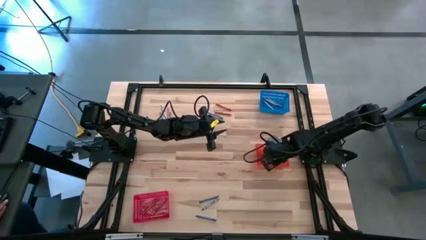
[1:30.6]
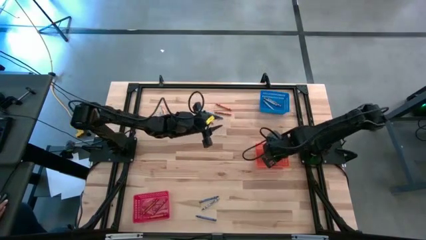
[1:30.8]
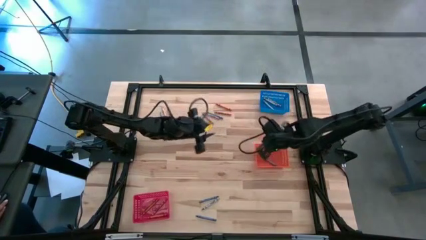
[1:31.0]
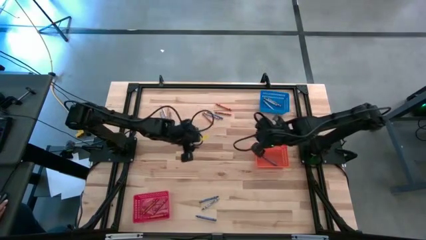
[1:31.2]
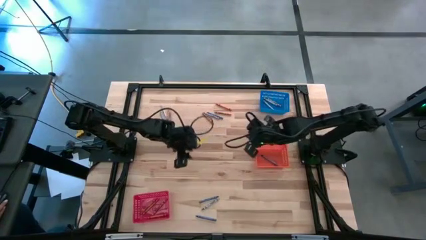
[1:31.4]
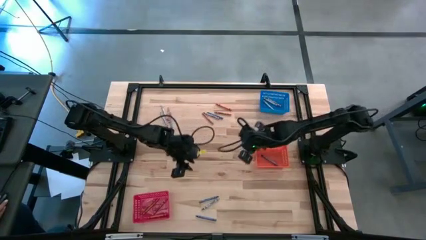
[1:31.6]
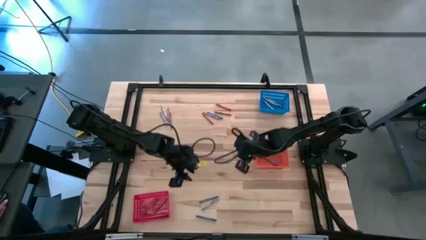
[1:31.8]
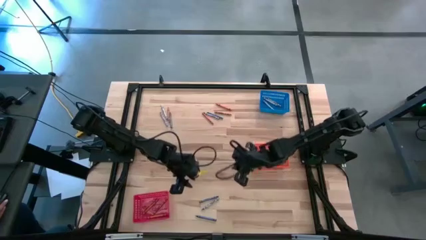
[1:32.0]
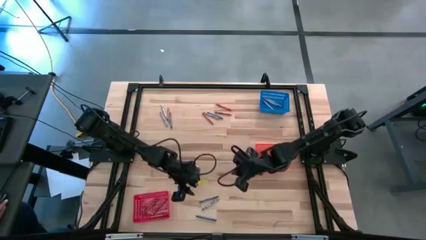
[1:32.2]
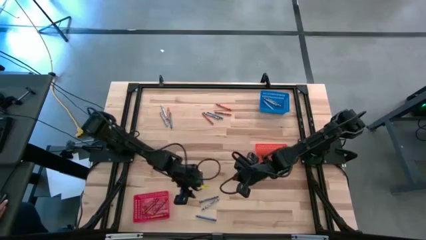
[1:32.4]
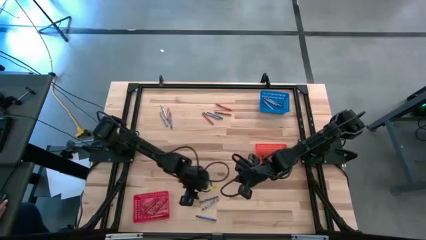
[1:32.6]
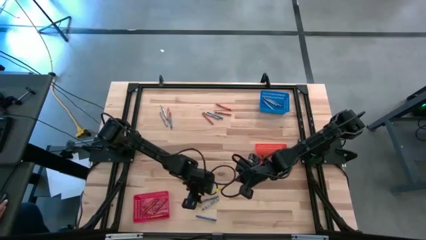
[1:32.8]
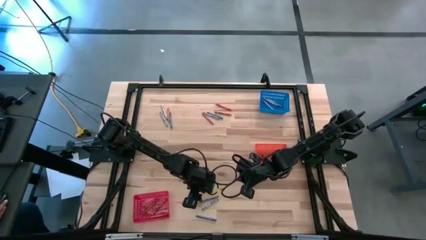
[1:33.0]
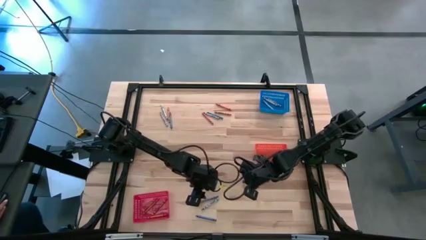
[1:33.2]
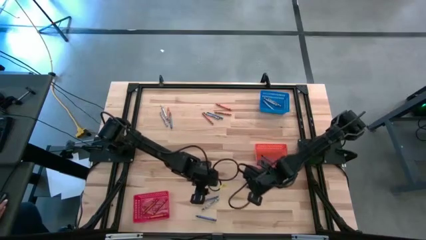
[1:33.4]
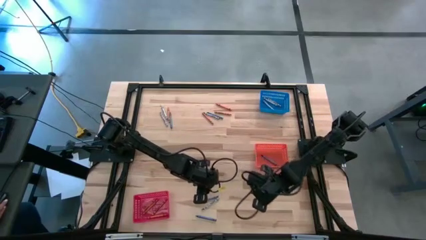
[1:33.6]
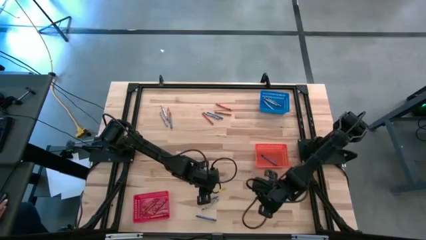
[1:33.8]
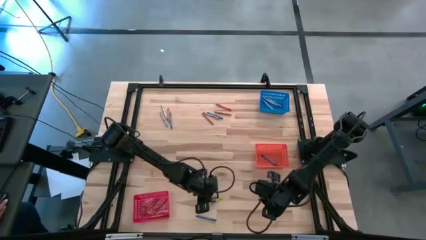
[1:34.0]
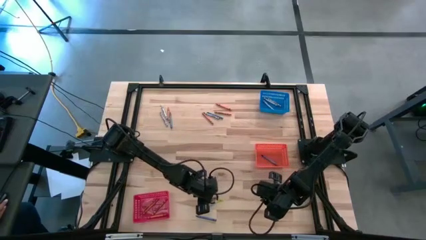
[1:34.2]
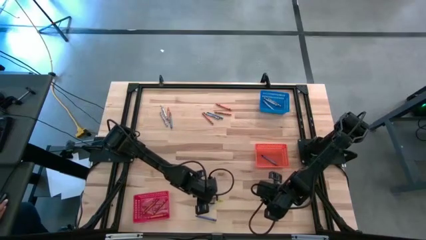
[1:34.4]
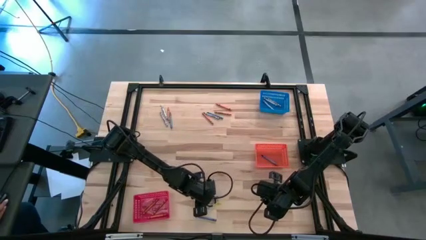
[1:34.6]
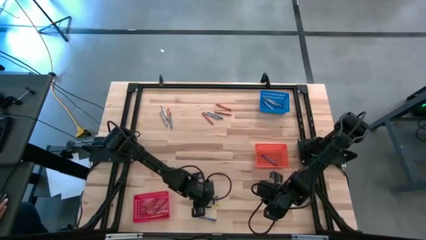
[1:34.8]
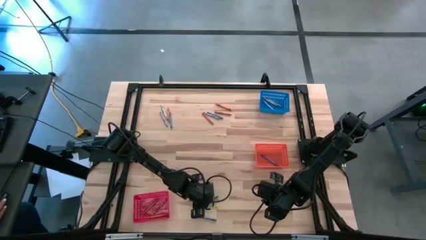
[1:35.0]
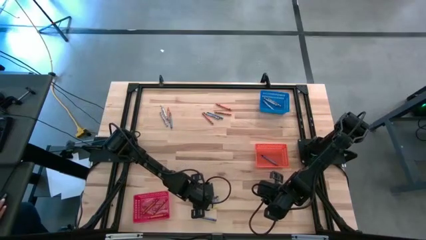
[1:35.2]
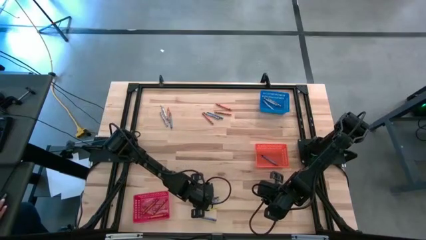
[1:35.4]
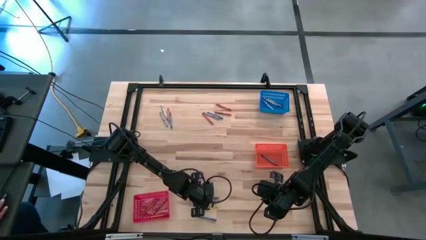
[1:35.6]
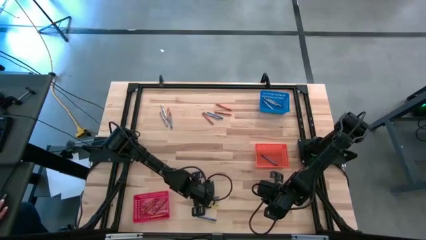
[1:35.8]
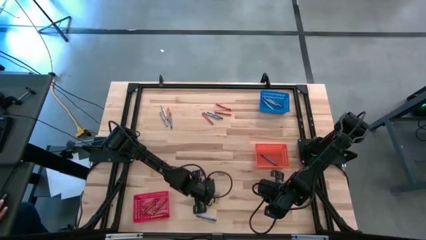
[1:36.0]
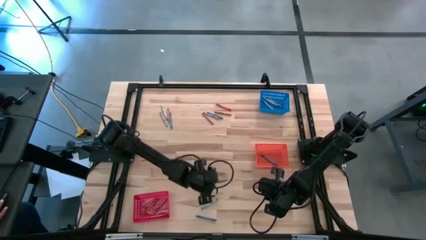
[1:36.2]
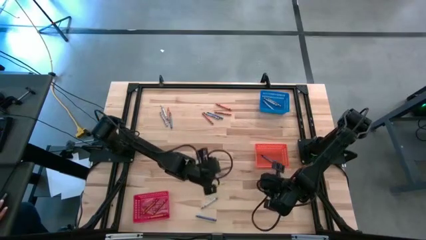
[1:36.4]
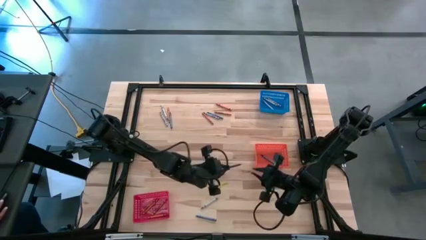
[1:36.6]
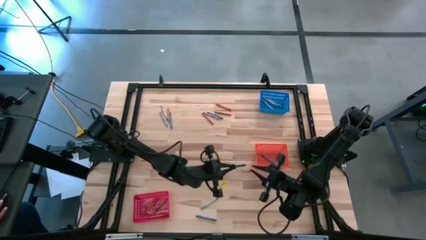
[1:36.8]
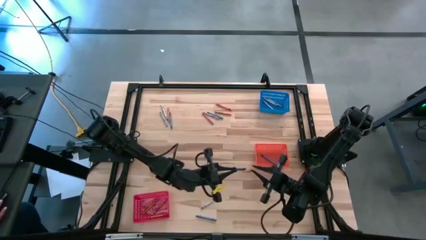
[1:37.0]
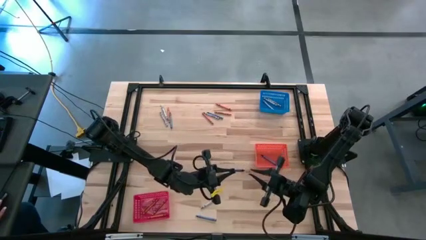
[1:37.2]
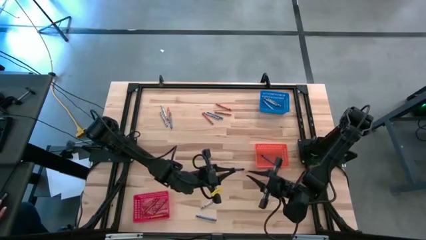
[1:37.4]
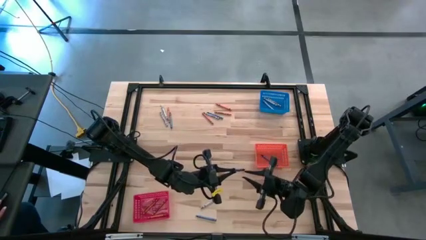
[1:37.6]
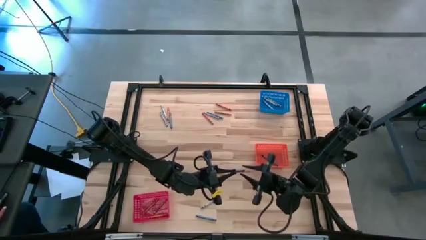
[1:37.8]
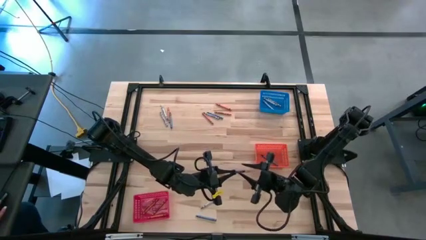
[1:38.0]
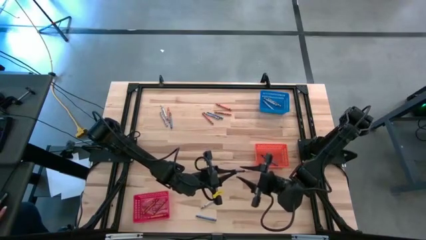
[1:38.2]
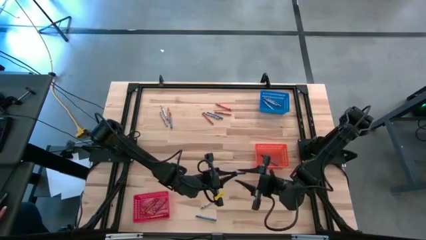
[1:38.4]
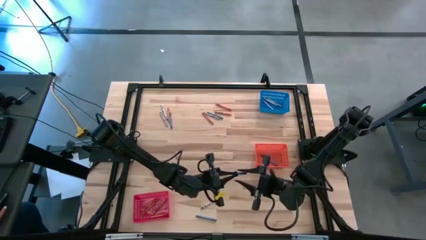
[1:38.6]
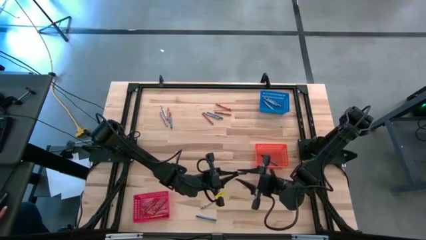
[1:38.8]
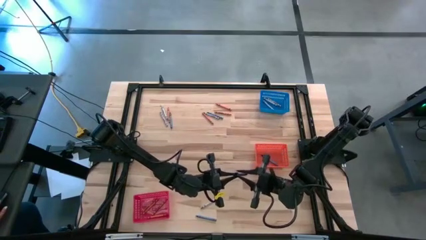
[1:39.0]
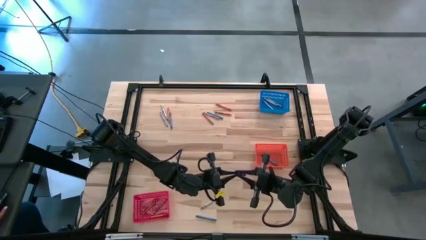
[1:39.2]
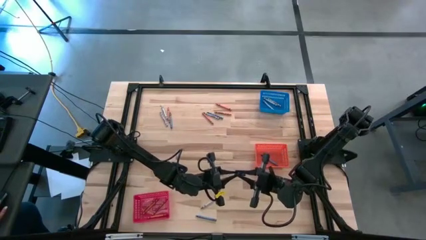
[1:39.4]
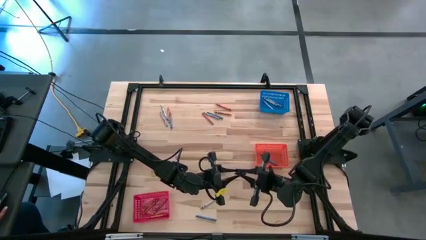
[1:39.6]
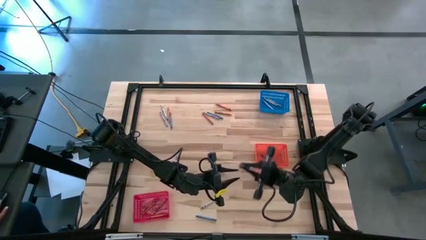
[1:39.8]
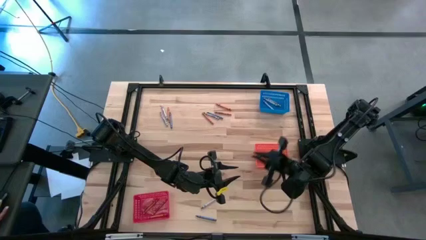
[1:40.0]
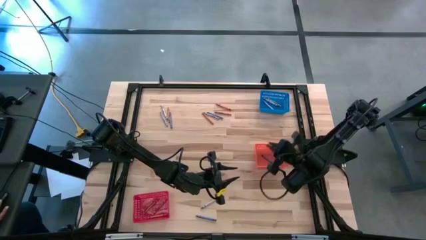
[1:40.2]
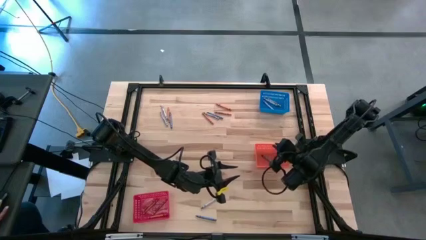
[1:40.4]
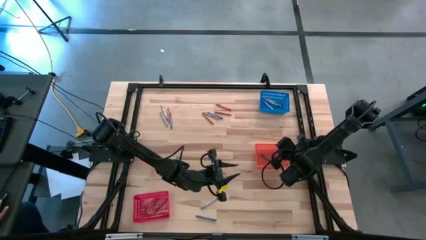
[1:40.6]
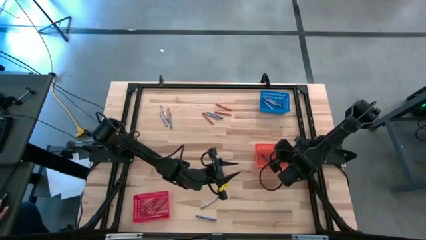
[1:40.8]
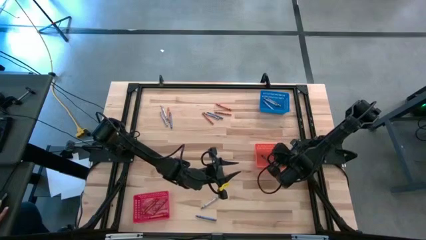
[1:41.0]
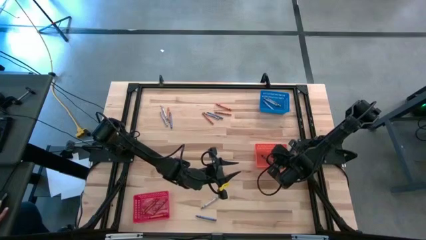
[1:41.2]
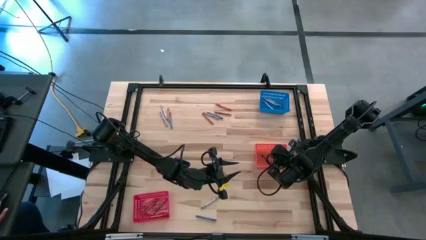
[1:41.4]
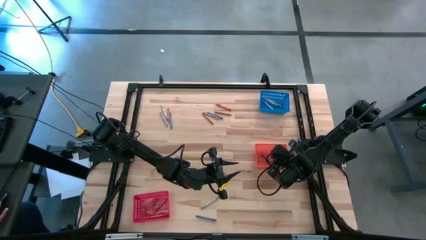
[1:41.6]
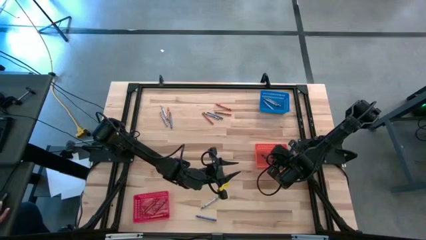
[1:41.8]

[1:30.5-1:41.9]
Task: Sort crayons
Put the blue crayon into the orange bin

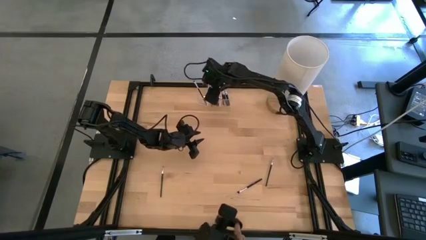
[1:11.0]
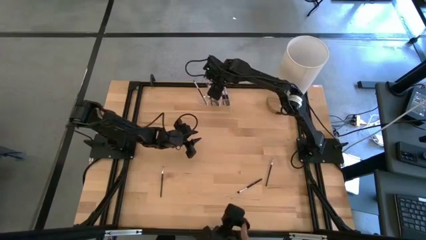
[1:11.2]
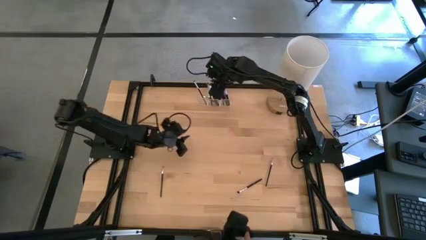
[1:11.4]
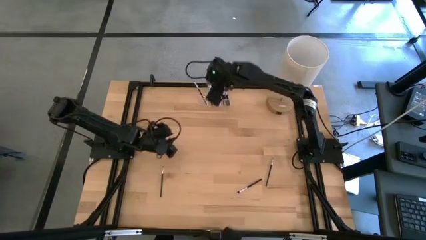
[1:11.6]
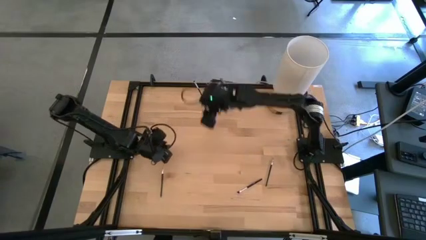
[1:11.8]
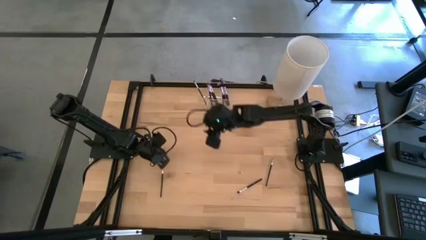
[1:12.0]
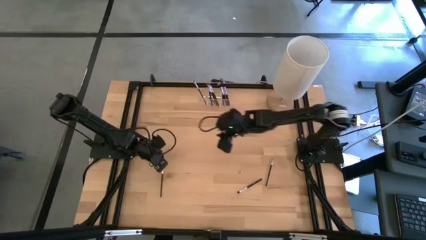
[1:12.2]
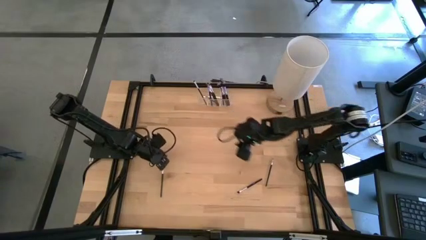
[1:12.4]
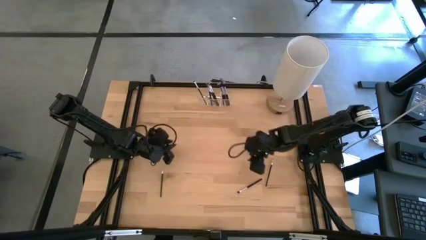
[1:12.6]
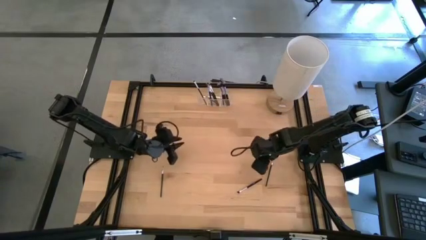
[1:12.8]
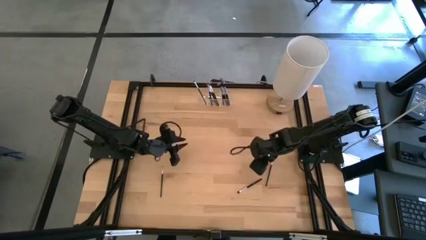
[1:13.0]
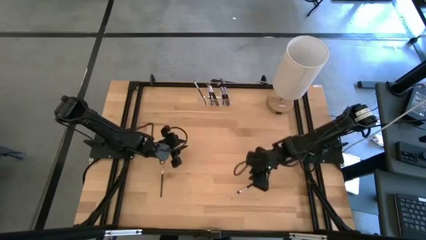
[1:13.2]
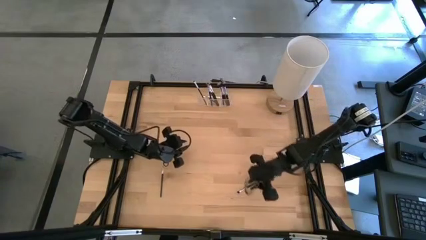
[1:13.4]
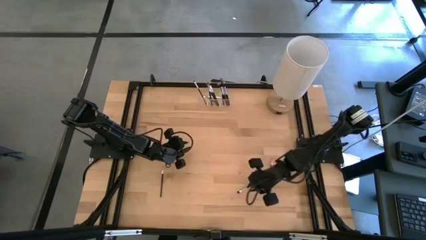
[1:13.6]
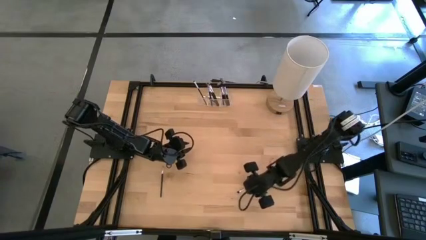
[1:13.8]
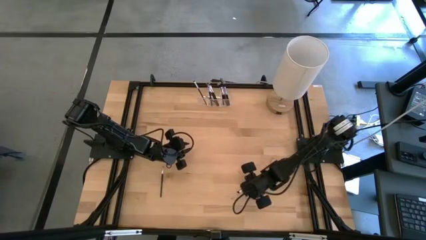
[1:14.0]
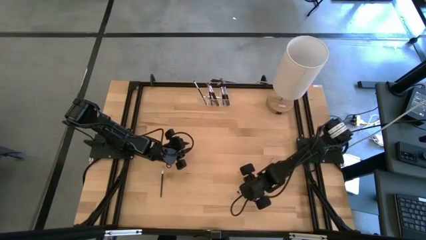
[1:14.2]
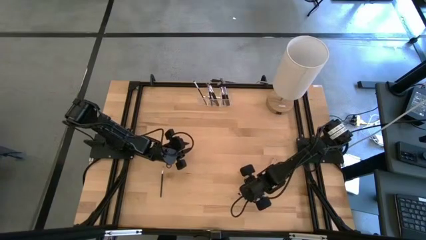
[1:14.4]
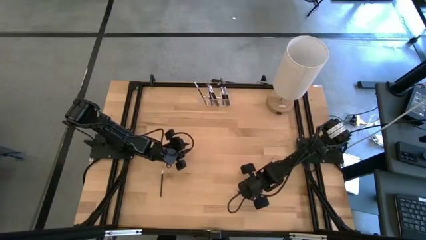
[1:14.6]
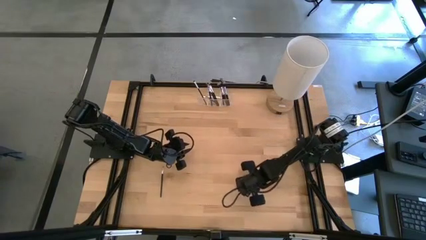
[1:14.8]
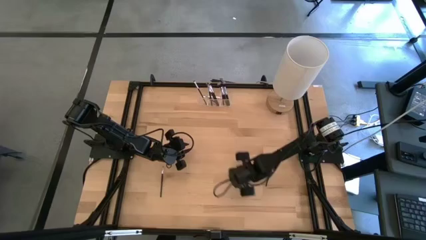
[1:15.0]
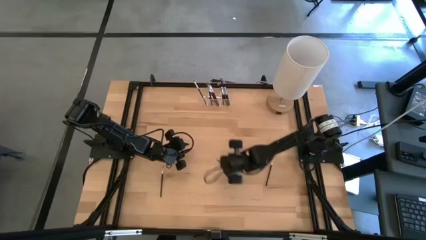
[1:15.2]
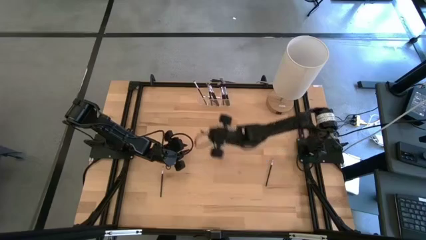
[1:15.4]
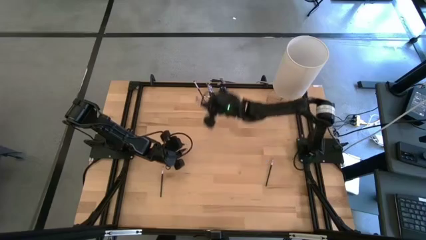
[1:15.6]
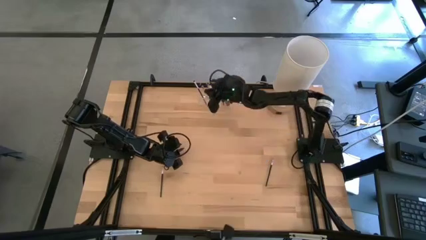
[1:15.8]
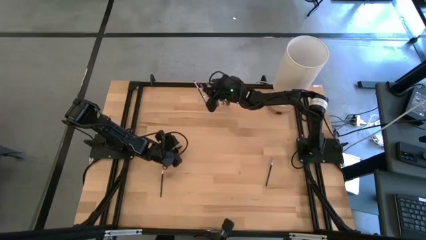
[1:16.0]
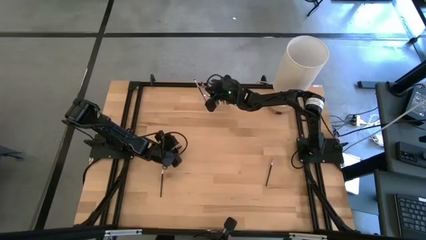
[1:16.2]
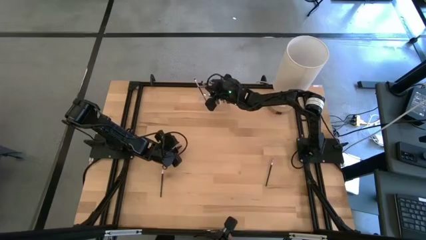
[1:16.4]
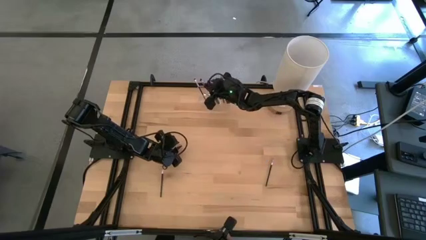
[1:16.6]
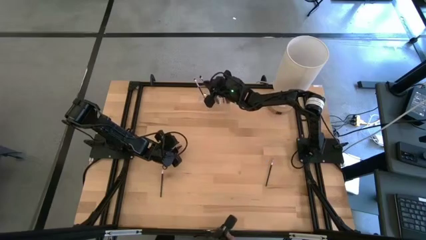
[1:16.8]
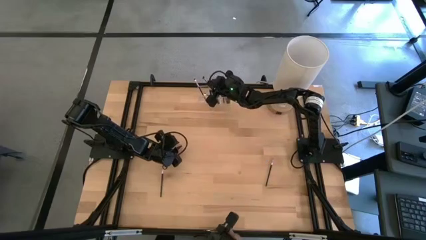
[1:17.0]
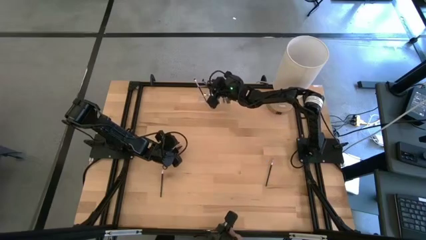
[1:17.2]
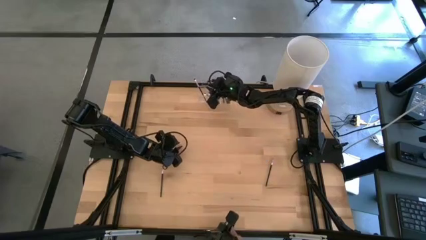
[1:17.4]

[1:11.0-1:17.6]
Task: Put items in baskets/containers
Put the black eyeshadow brush into the transparent organizer
